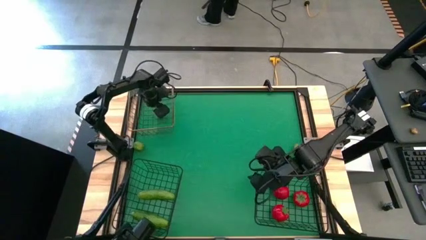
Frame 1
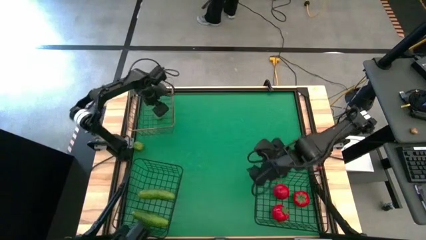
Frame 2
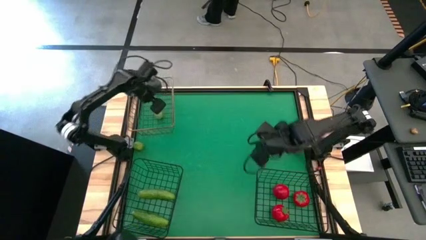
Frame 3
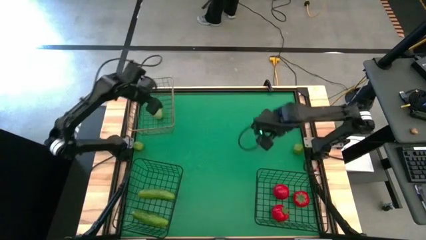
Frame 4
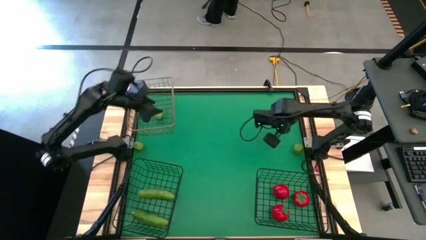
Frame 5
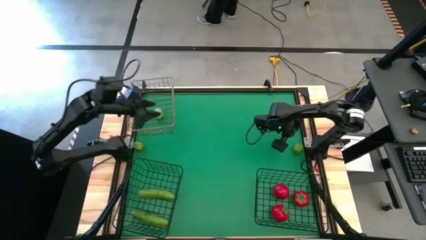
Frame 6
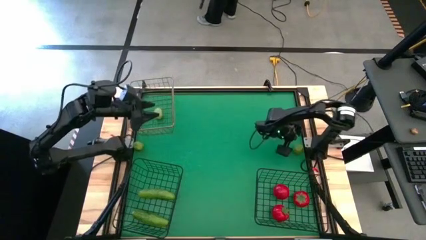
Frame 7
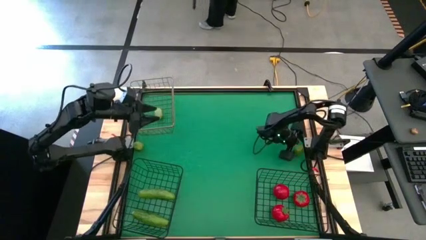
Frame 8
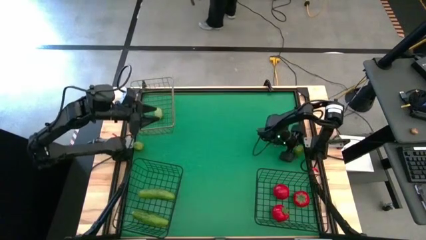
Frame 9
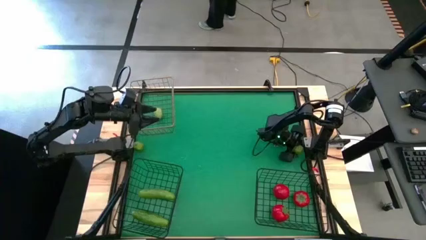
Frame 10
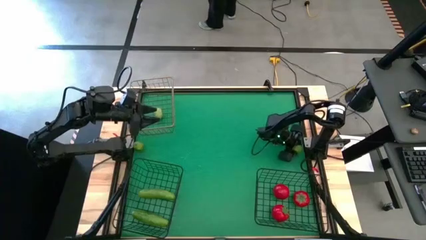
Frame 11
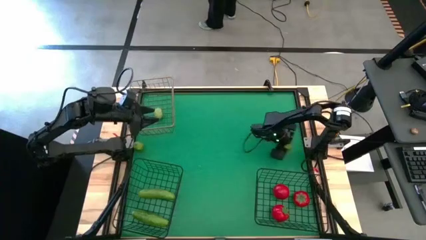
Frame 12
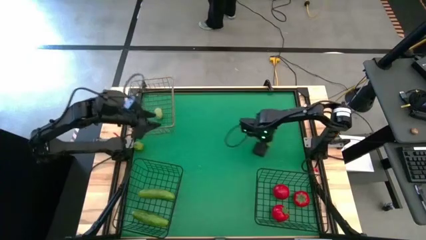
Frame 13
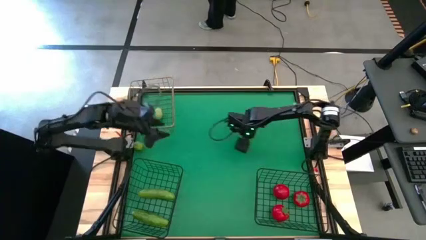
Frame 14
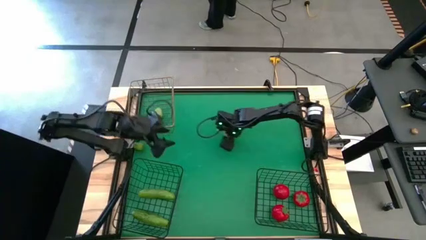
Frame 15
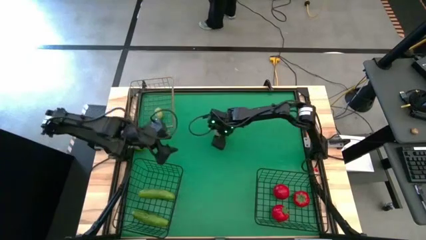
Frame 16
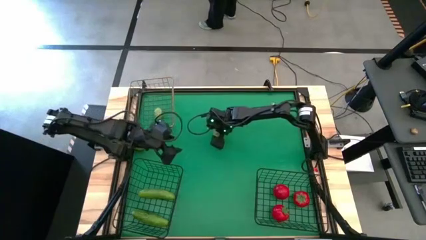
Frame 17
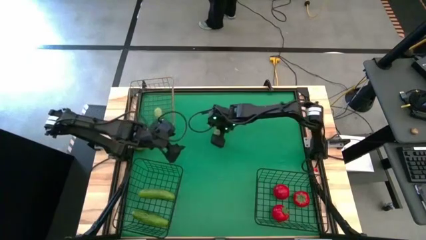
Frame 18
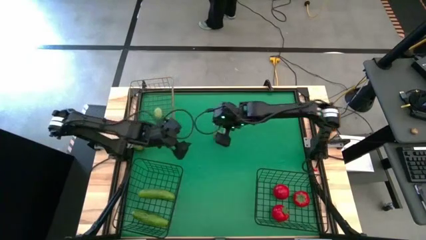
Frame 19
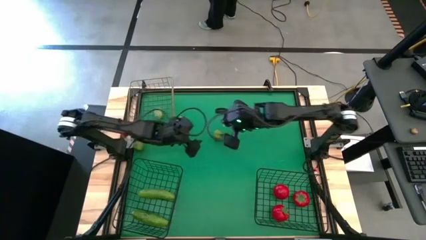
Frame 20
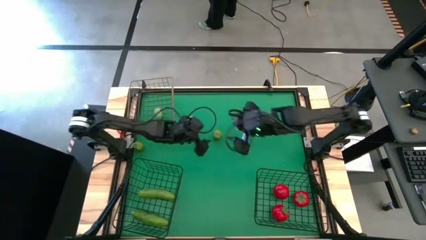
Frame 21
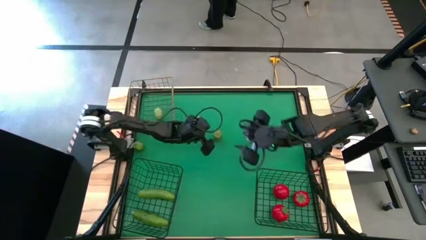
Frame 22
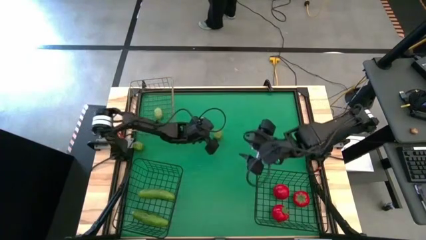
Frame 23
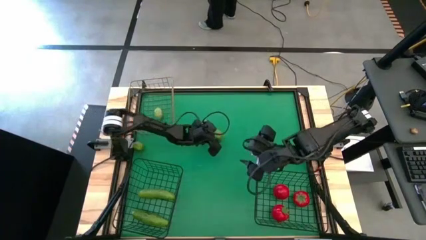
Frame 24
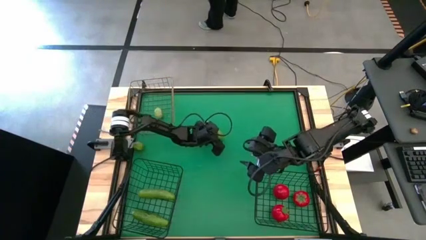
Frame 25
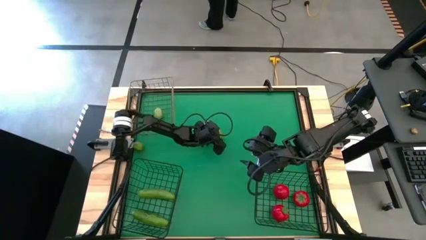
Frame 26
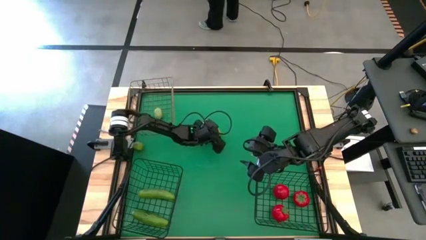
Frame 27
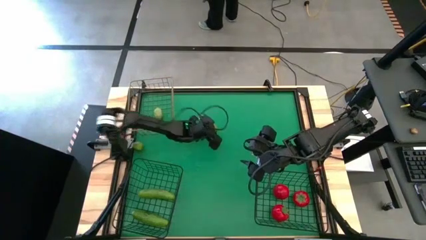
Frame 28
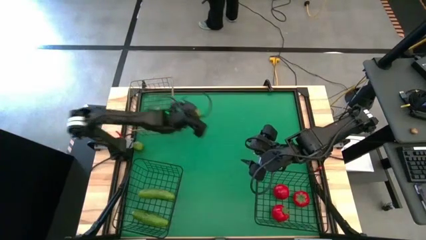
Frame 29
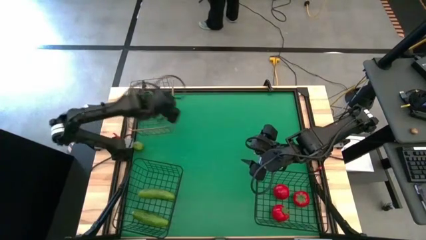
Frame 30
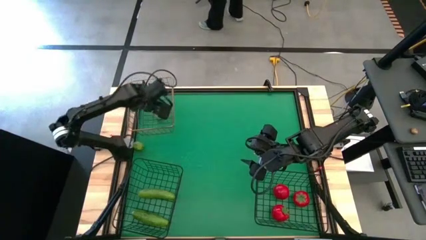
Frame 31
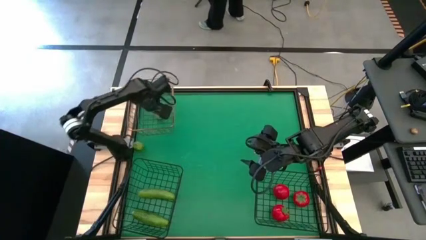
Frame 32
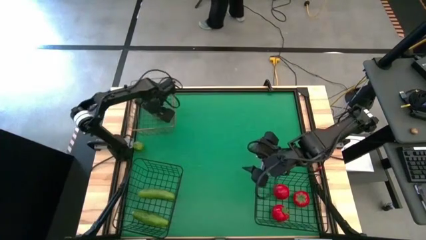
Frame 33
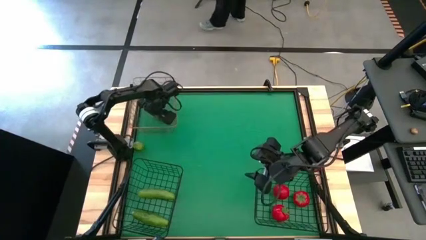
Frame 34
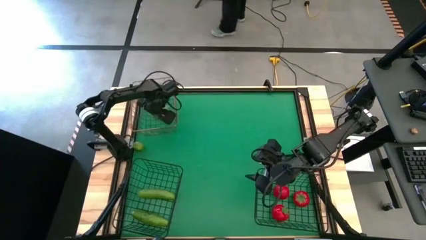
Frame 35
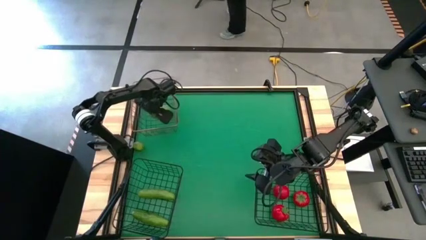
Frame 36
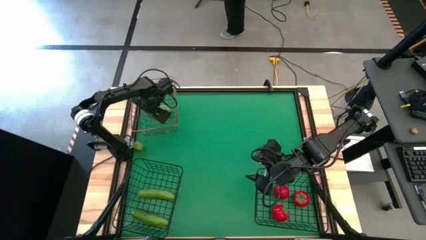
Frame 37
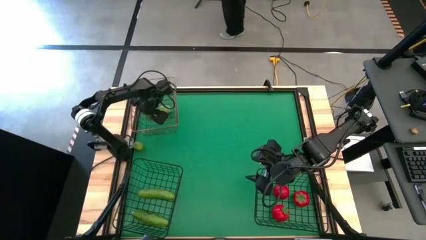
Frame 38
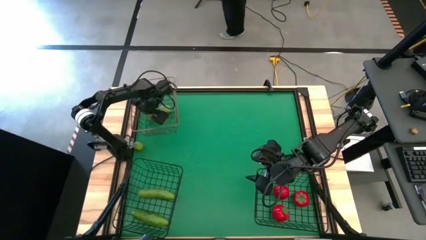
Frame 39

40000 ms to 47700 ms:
Task: Sort produce into baskets
Put the right lemon into the top left wire basket

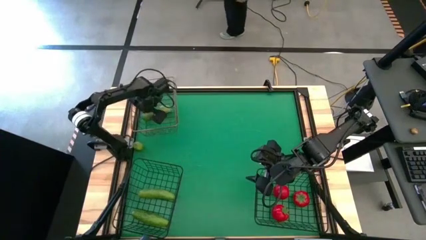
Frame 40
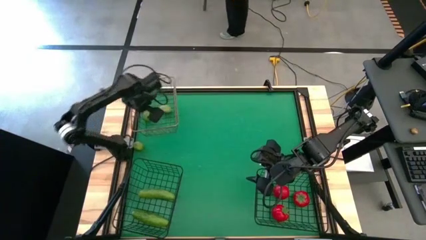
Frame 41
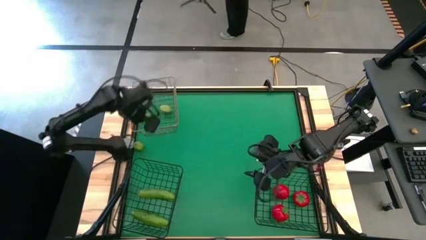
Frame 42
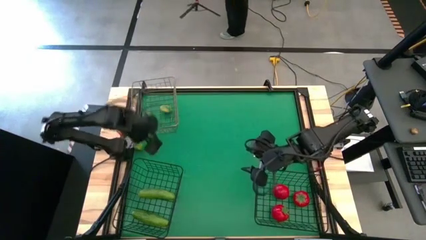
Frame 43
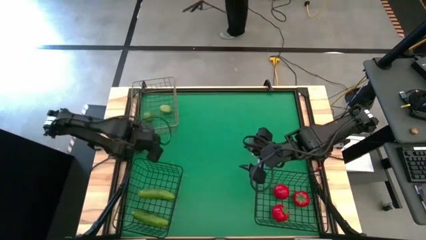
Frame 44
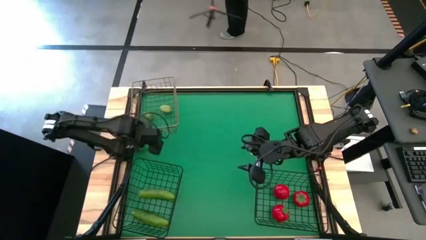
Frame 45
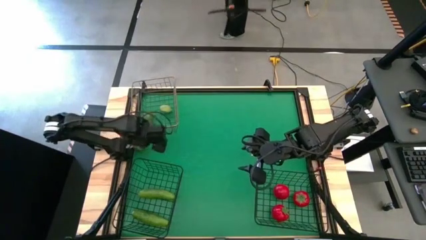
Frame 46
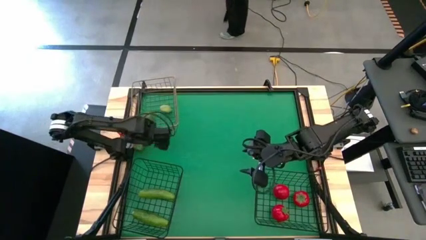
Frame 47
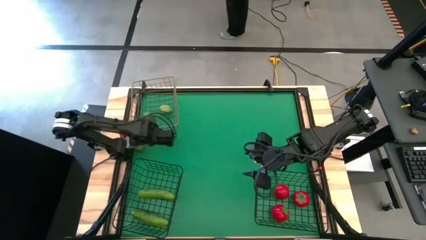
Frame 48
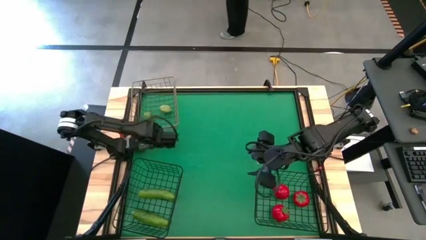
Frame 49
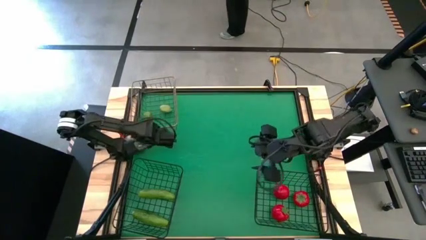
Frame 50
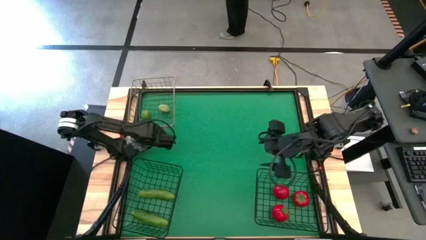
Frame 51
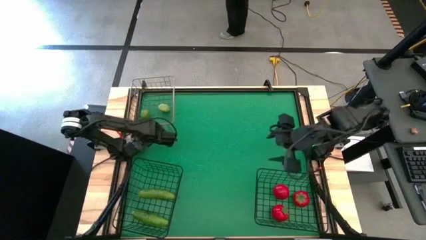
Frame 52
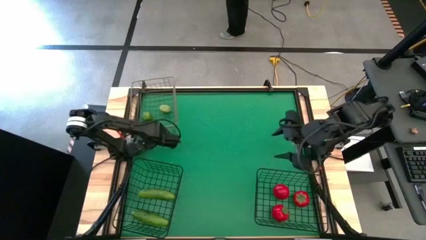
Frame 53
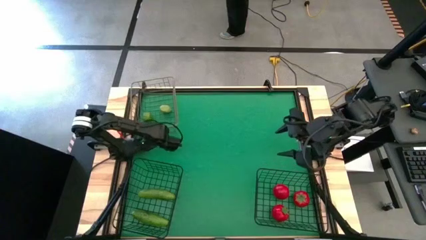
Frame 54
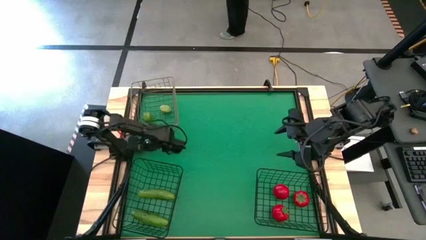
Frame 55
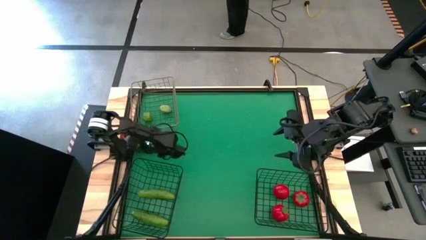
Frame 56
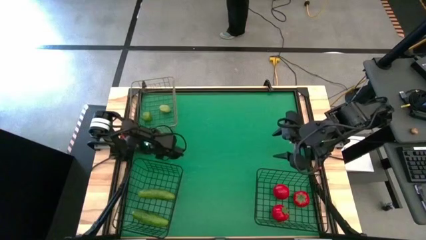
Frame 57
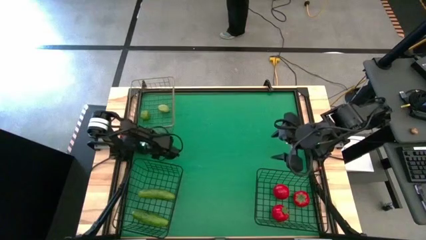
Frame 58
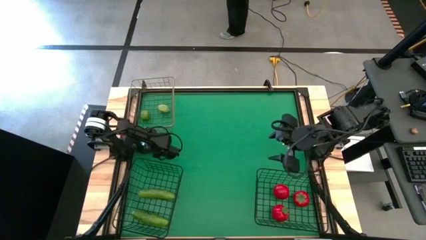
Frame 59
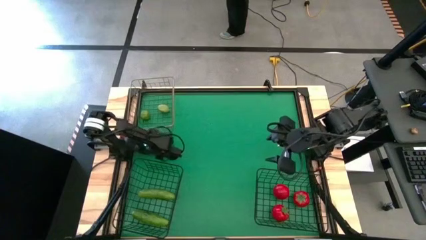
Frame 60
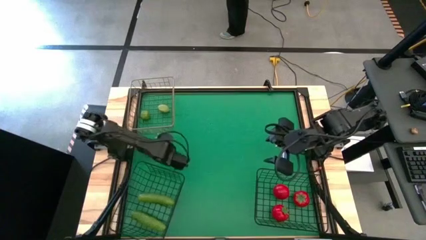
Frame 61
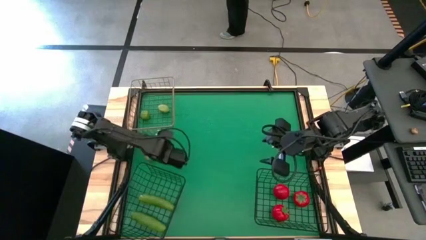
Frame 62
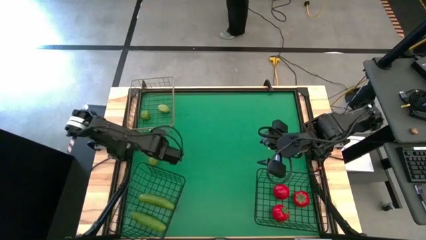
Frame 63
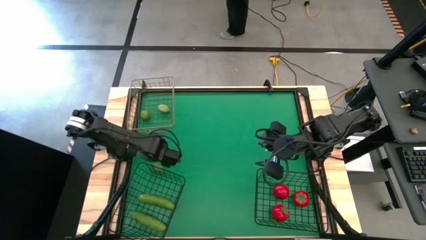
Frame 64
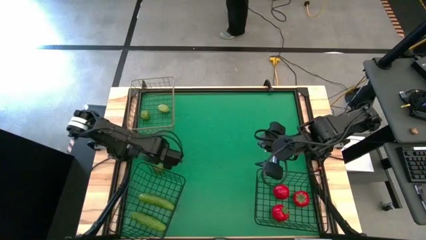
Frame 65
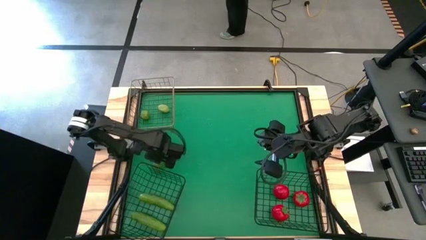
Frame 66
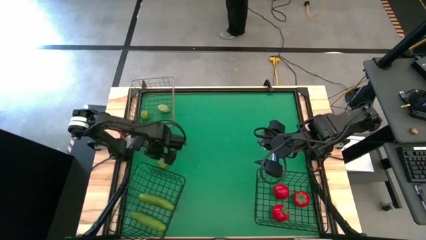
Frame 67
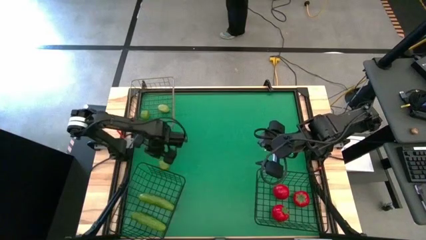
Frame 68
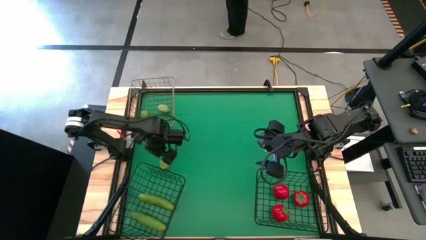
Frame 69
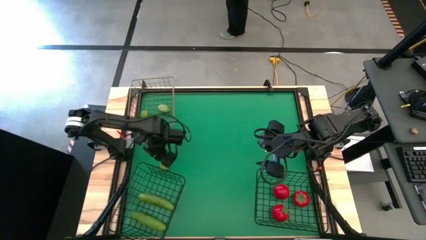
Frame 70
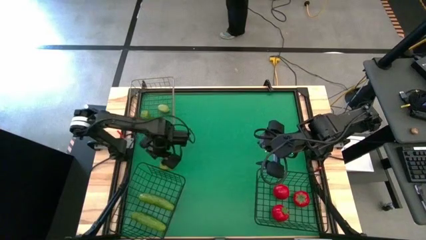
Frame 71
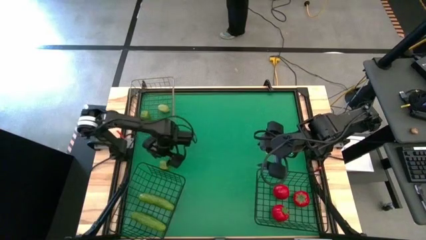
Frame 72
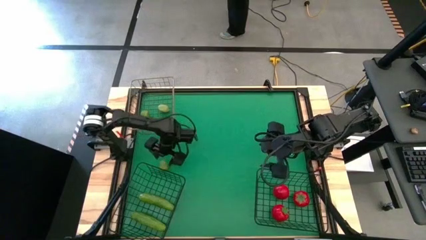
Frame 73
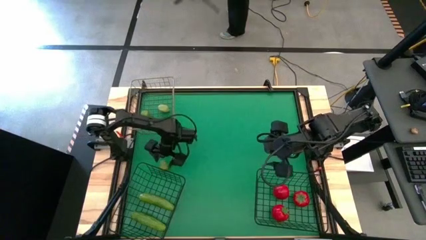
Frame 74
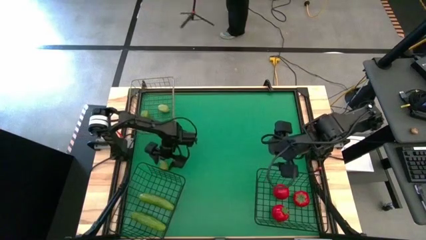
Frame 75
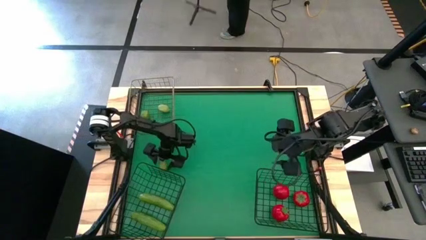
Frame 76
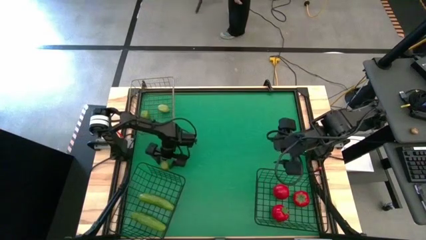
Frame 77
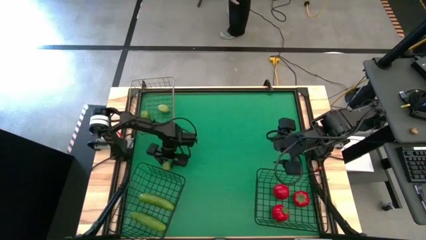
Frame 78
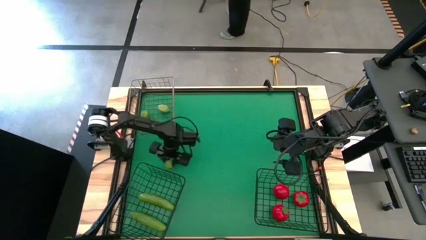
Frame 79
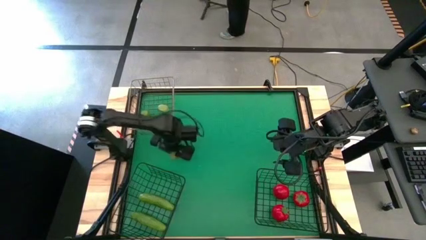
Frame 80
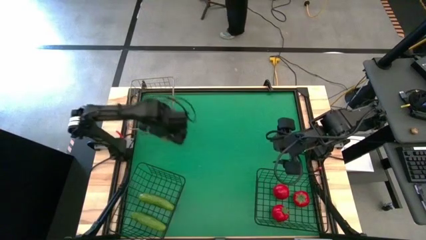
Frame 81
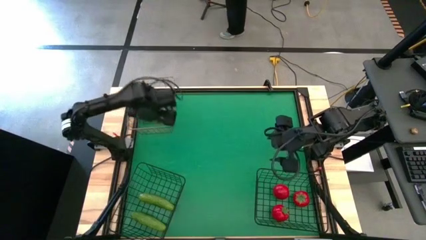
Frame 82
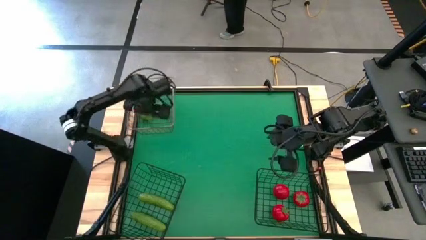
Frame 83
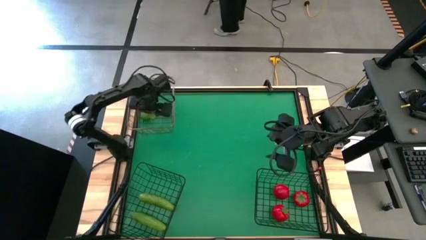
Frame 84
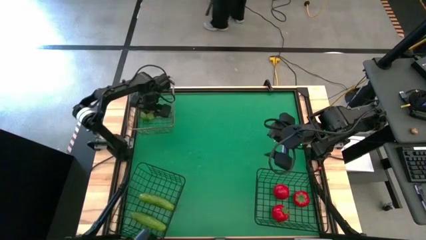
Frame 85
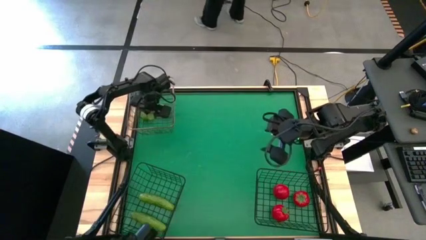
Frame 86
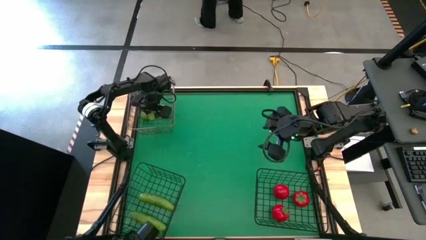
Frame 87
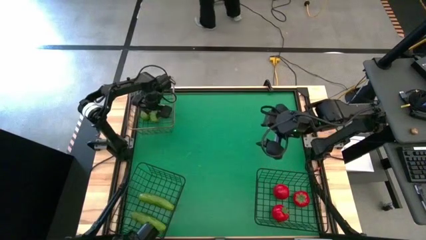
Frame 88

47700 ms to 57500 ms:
Put the lime into the top left wire basket
